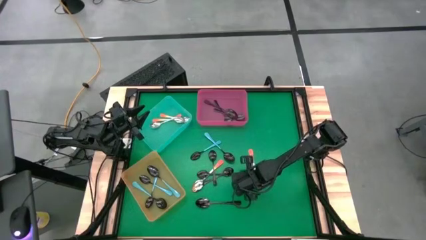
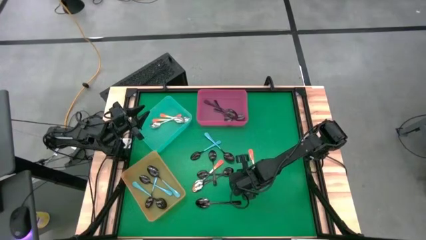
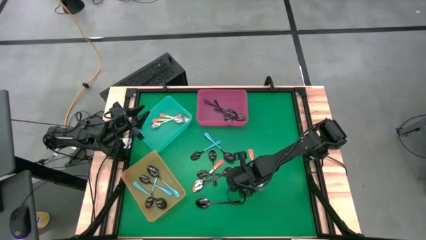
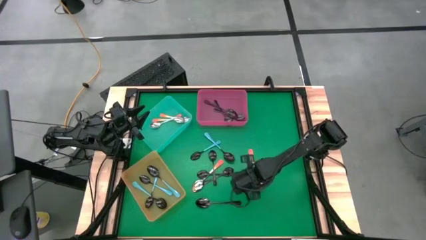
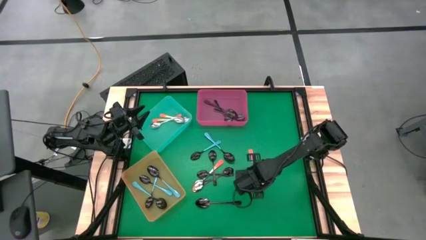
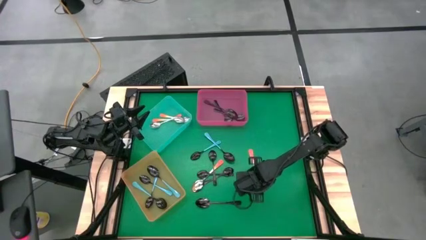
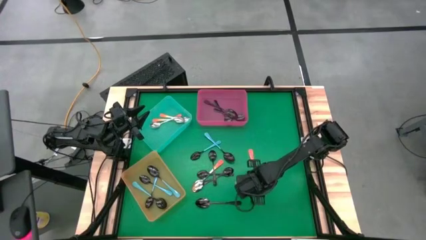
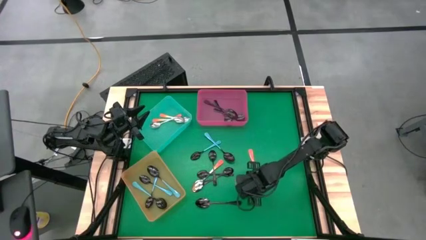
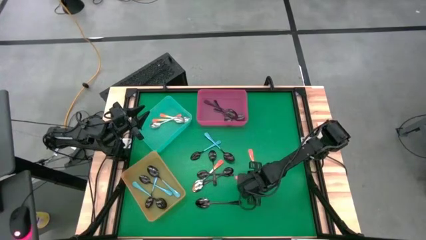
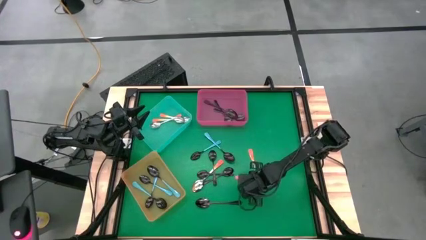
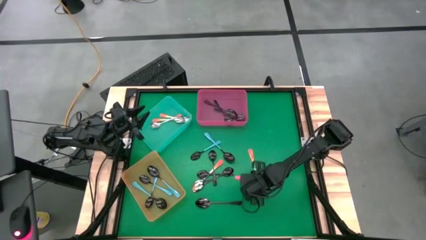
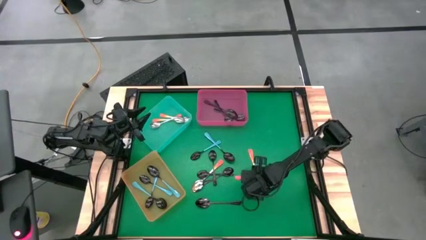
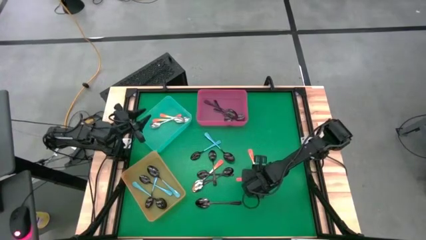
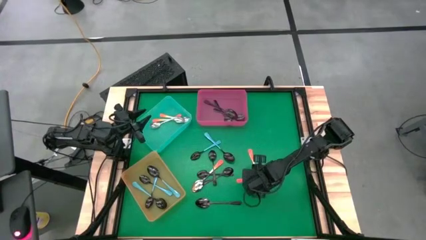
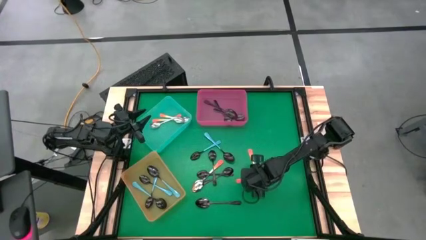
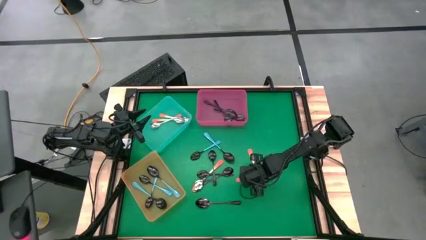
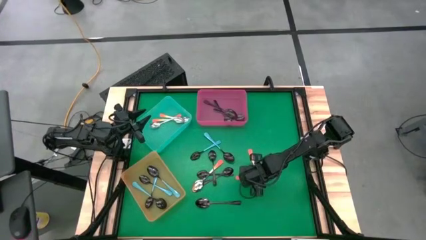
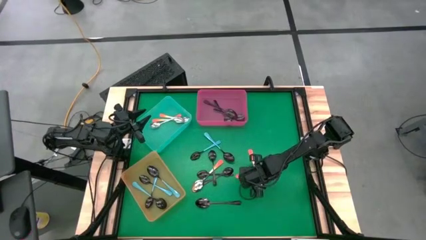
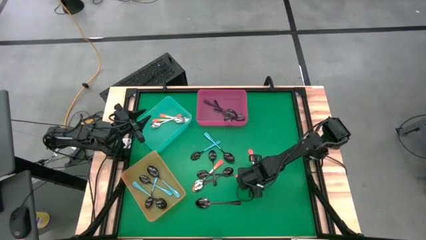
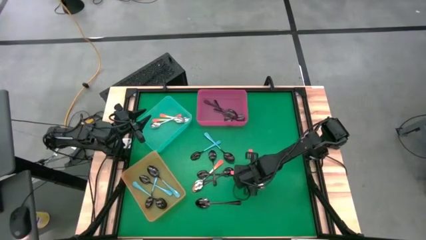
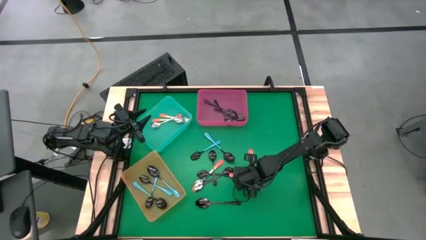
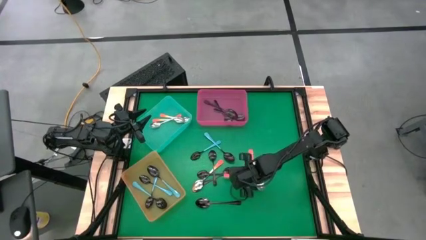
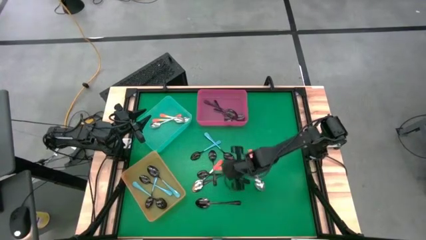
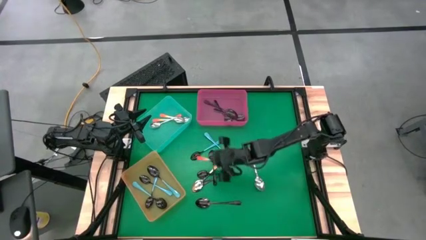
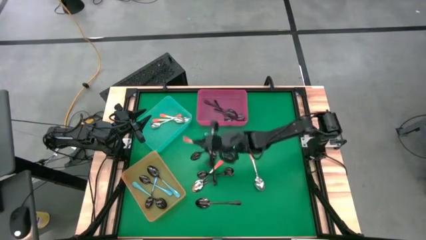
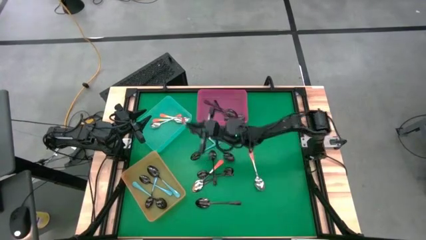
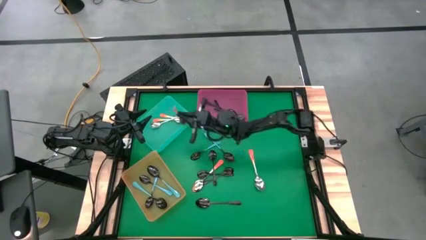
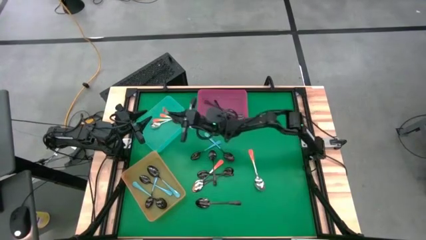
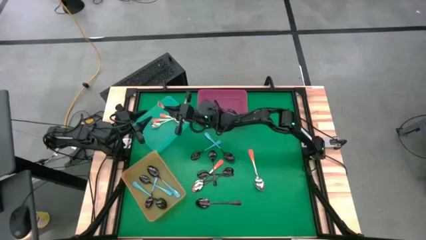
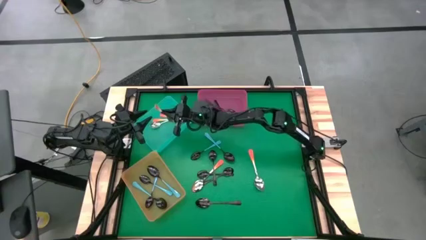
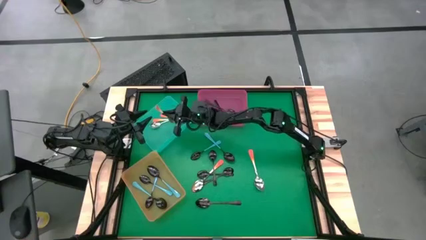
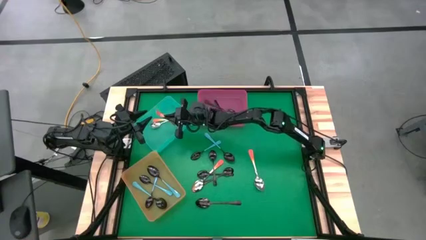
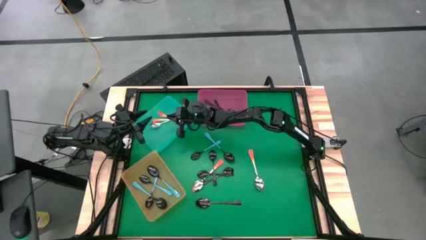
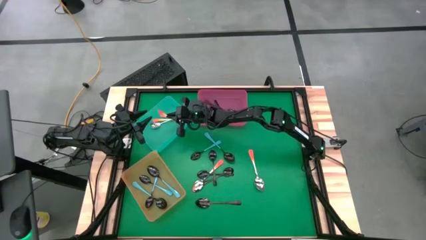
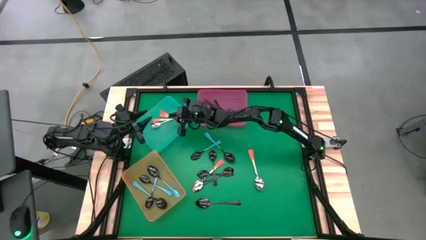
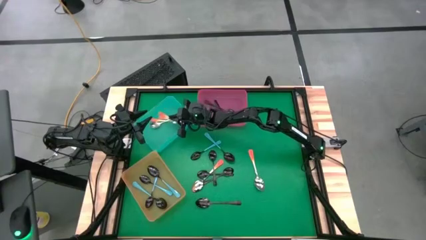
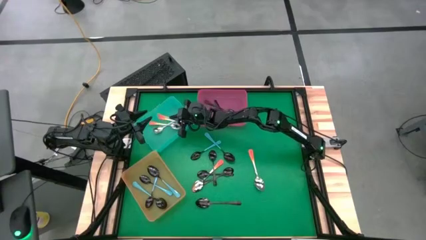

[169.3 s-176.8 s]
Task: Sort silverware by color (type)
Put the orange spoon into the blue bin

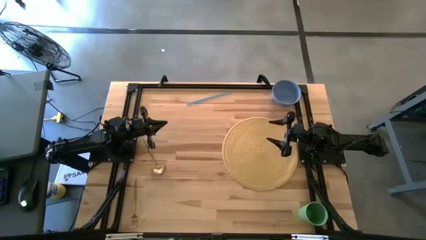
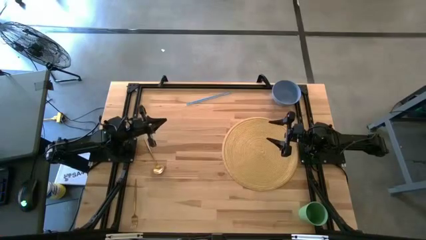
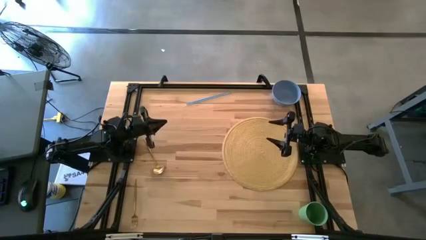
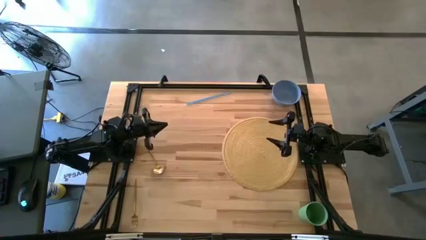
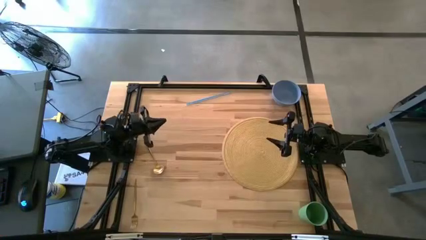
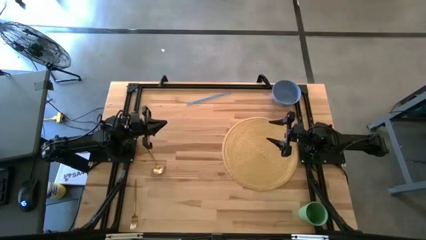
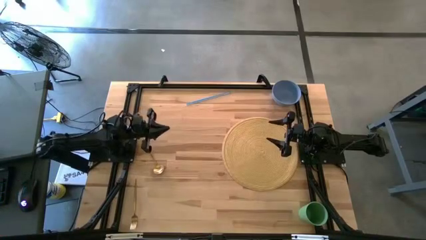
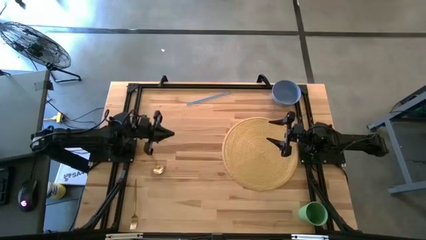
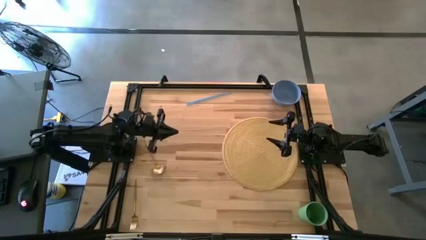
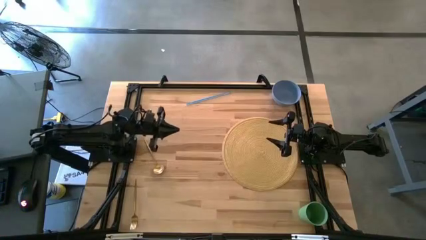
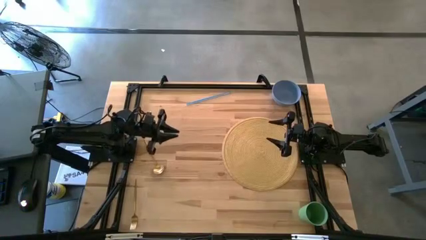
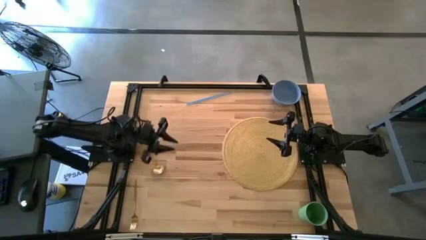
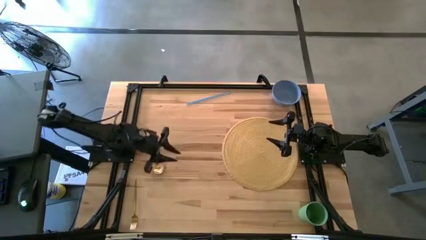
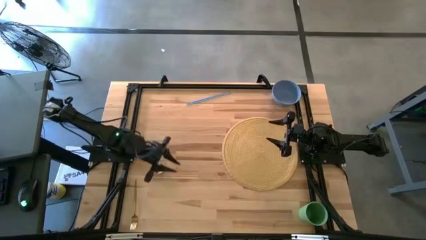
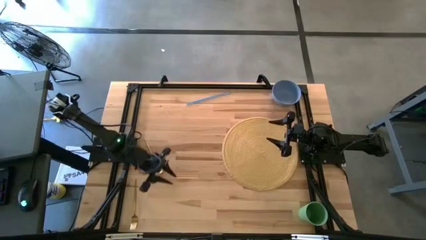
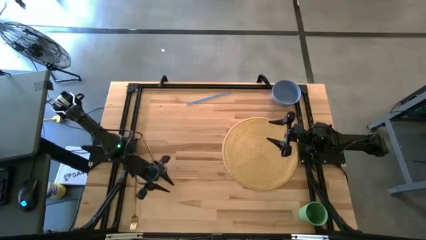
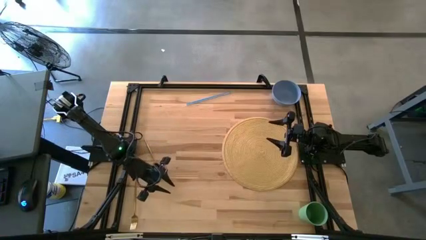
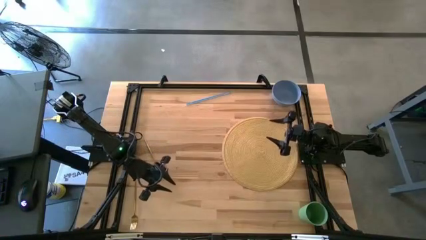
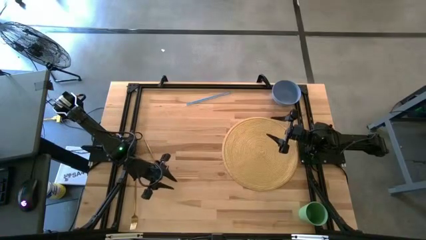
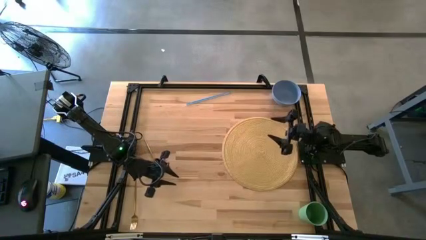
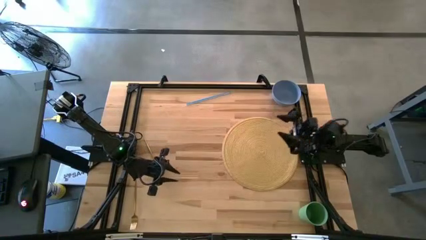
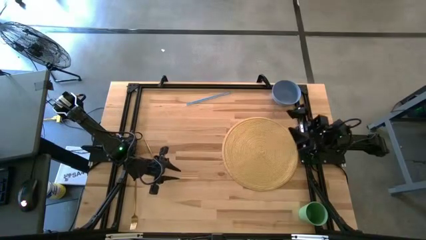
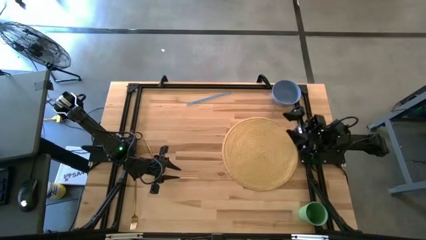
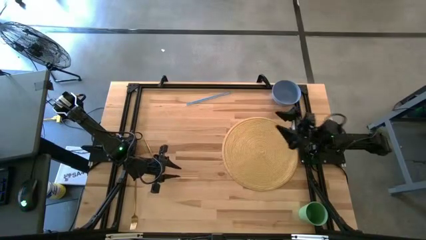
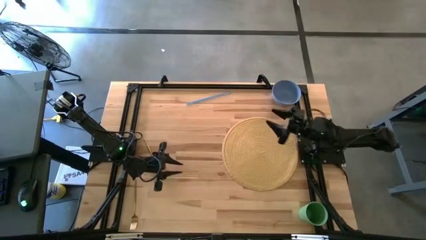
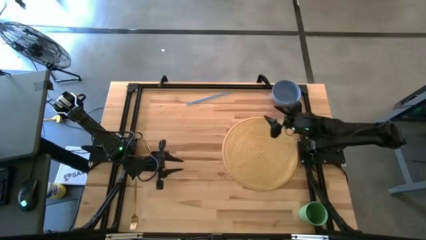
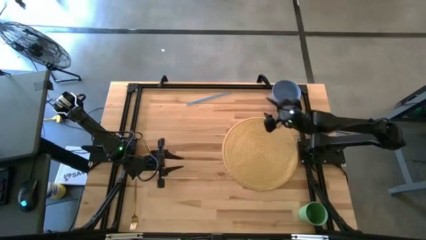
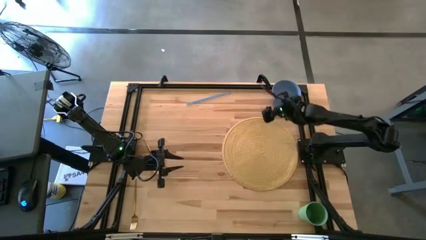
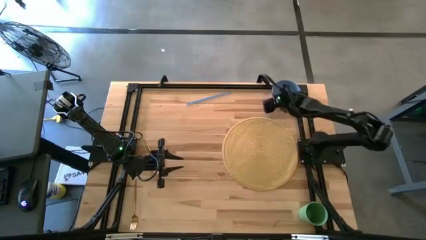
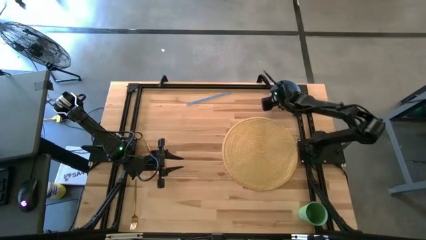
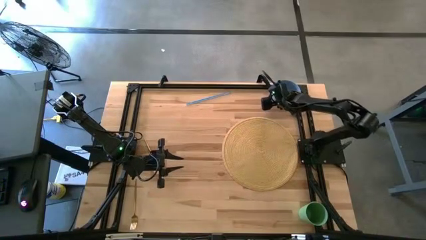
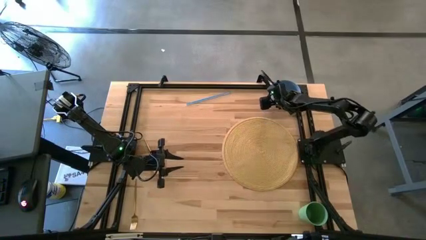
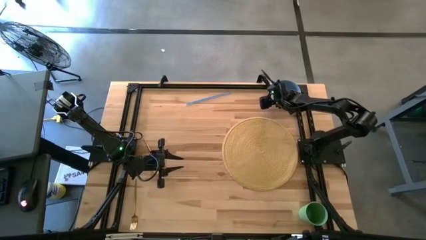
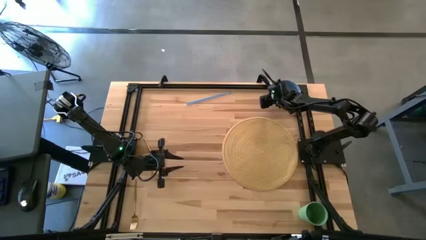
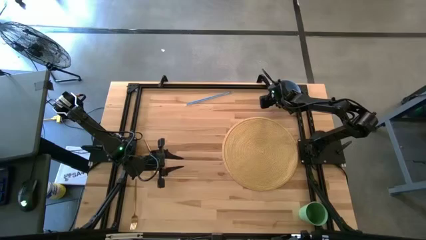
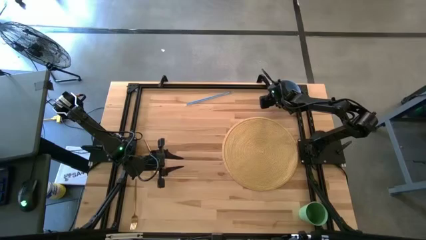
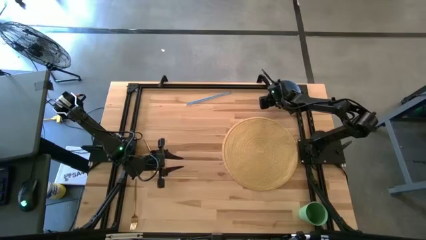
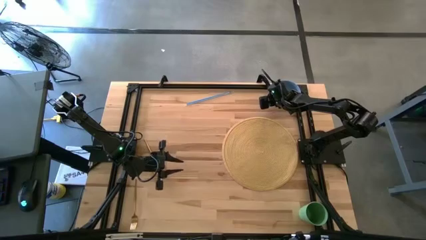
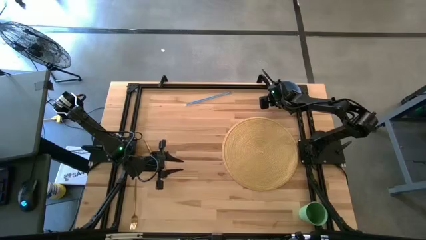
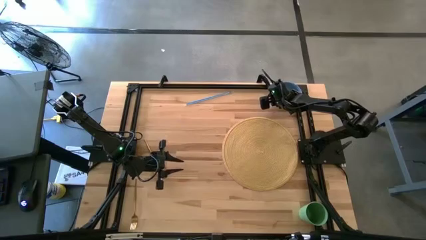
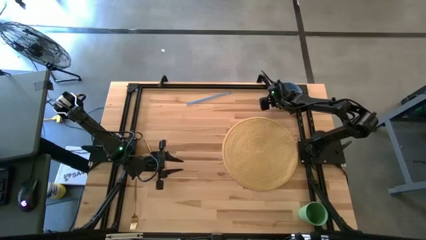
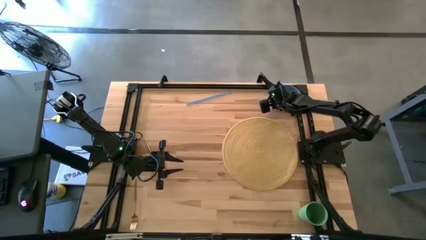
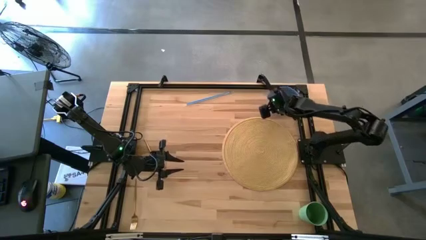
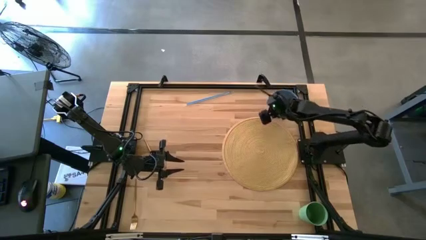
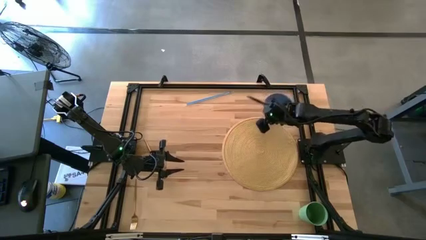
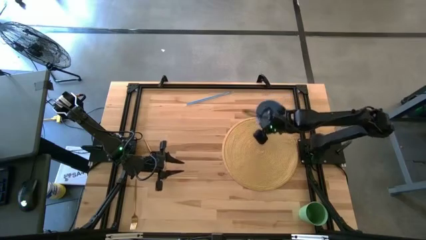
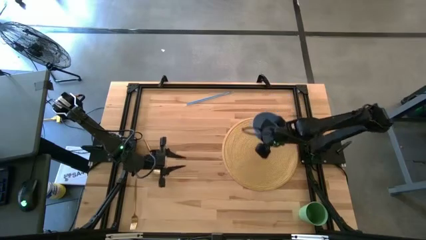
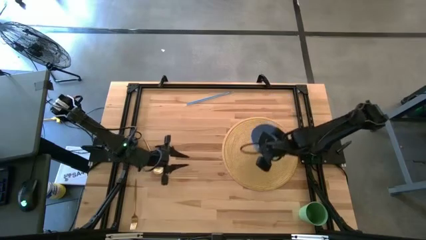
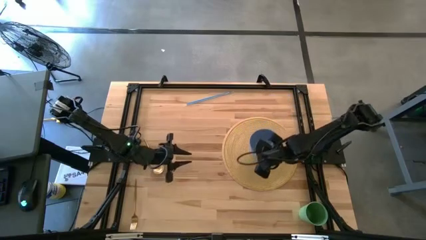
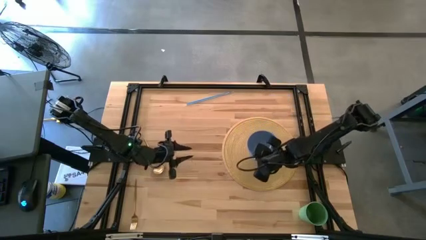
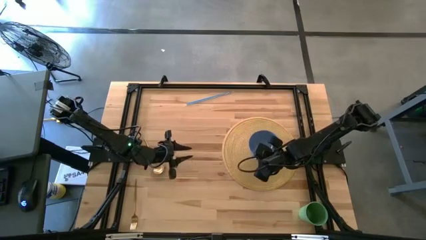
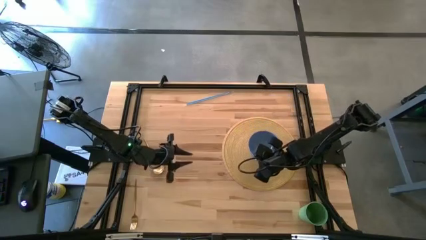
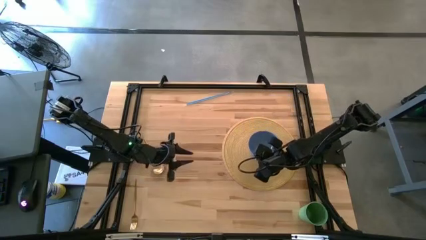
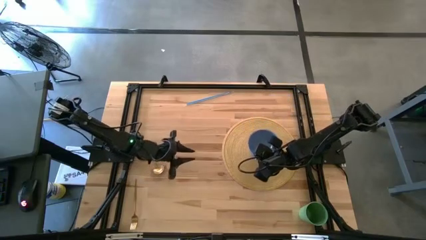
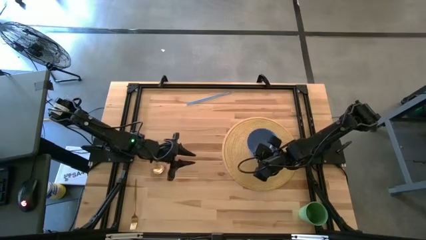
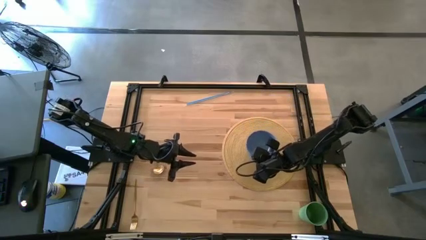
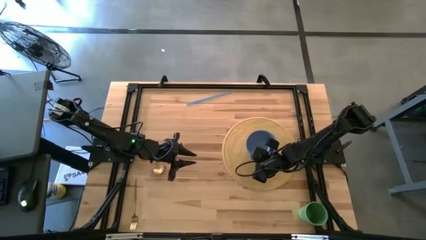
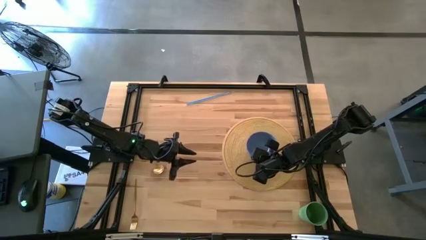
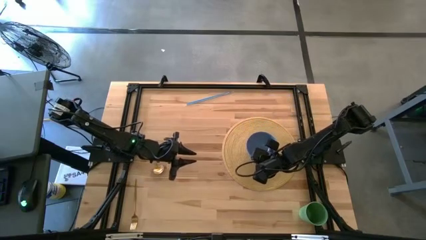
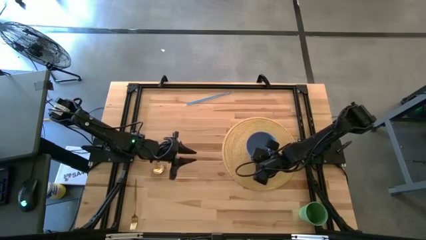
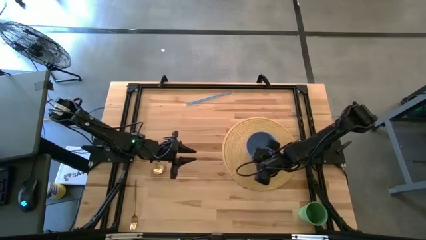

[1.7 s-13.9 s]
Task: Pick & Place Utensil
Put the violet bowl in the center of the brown table mat
